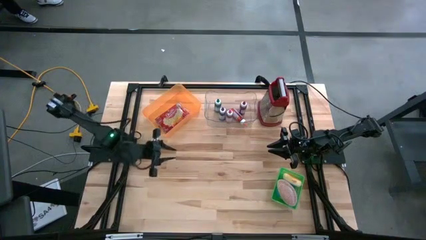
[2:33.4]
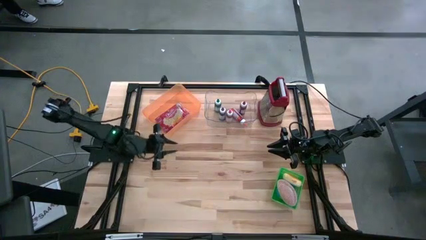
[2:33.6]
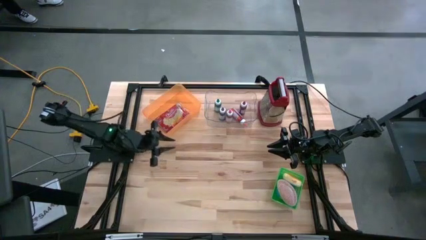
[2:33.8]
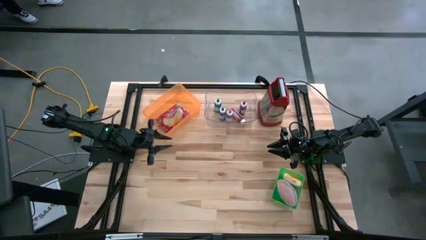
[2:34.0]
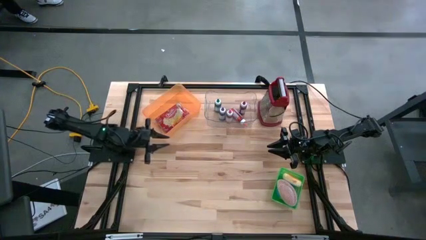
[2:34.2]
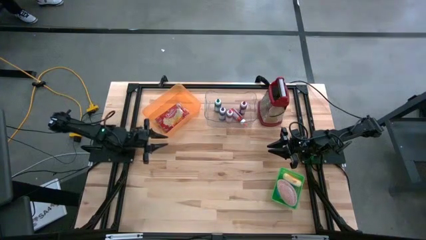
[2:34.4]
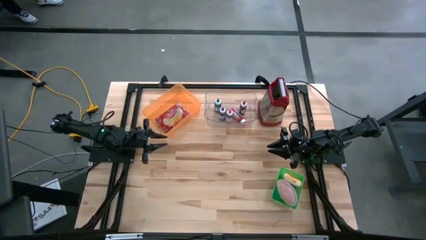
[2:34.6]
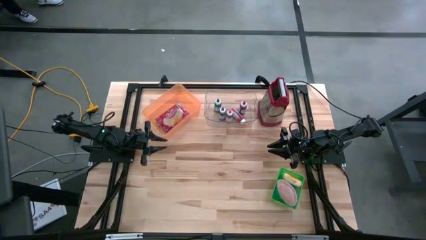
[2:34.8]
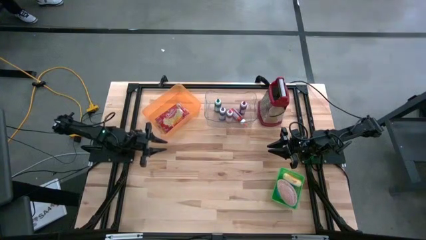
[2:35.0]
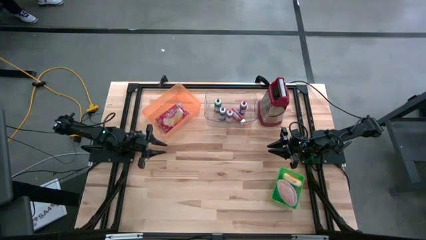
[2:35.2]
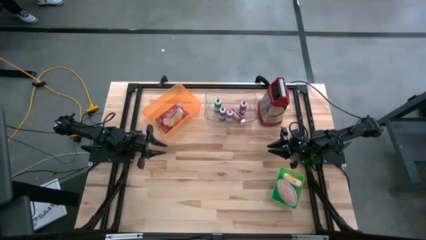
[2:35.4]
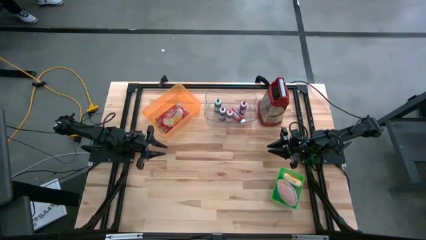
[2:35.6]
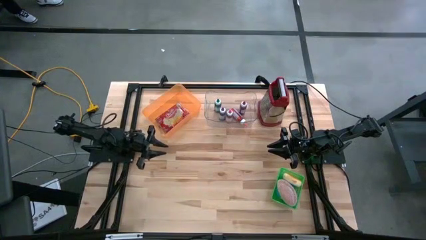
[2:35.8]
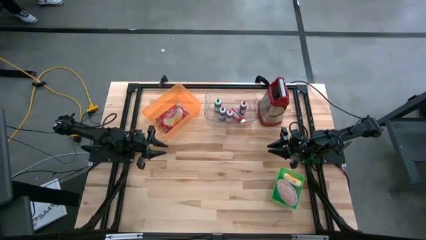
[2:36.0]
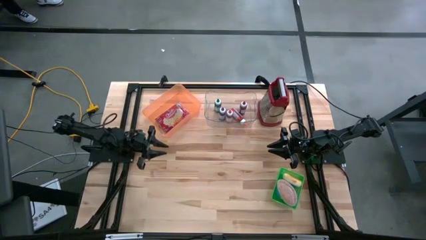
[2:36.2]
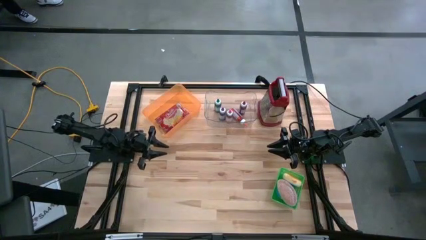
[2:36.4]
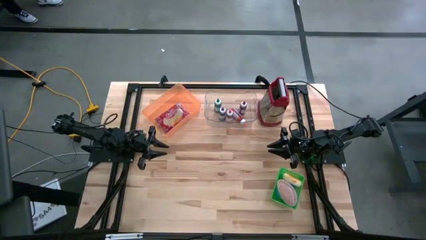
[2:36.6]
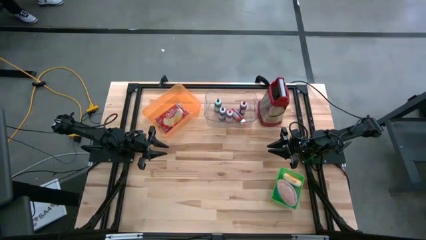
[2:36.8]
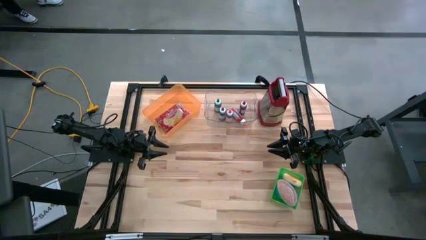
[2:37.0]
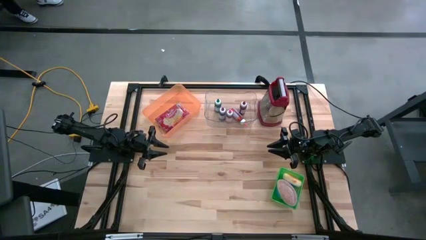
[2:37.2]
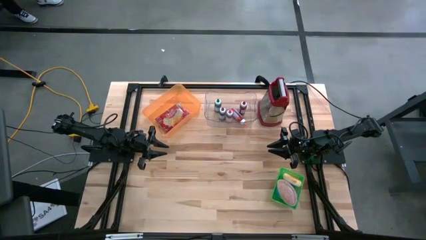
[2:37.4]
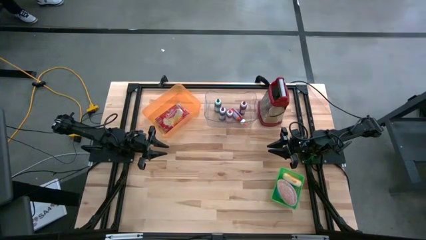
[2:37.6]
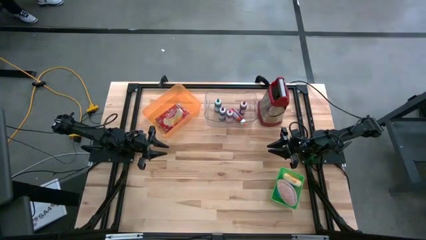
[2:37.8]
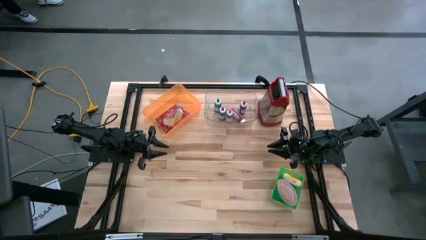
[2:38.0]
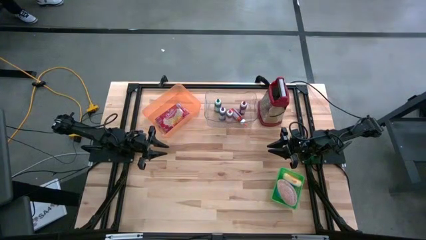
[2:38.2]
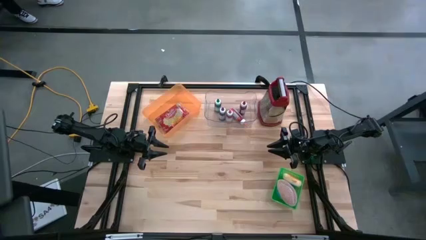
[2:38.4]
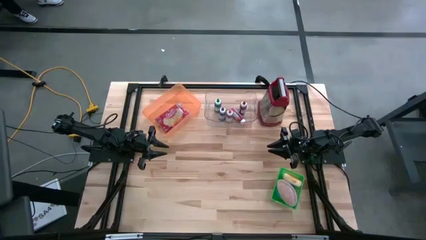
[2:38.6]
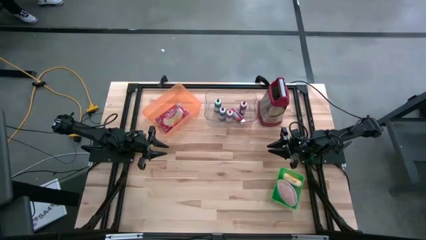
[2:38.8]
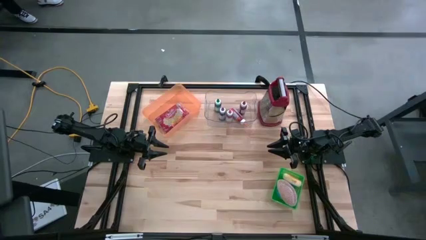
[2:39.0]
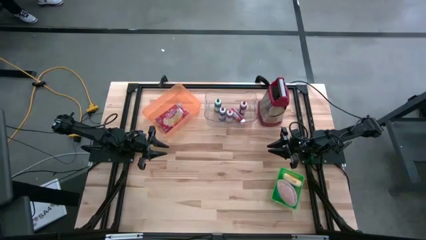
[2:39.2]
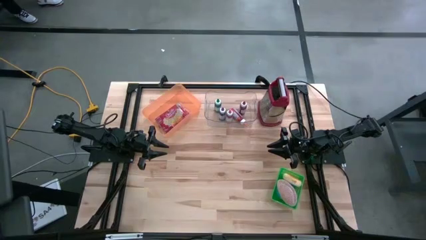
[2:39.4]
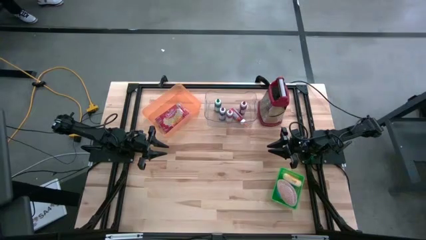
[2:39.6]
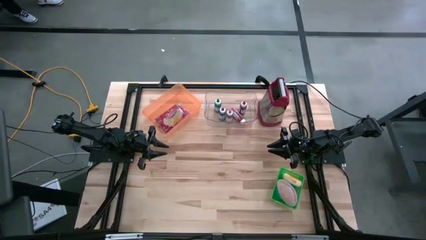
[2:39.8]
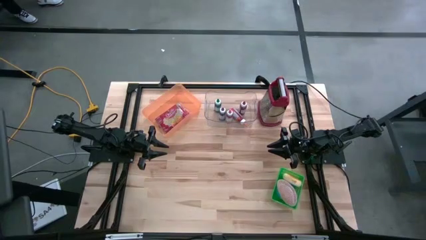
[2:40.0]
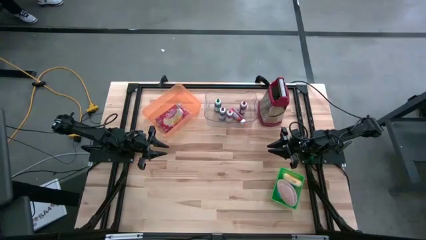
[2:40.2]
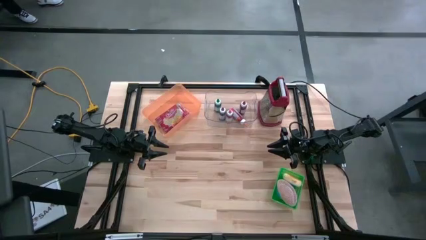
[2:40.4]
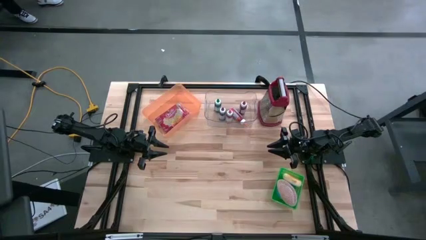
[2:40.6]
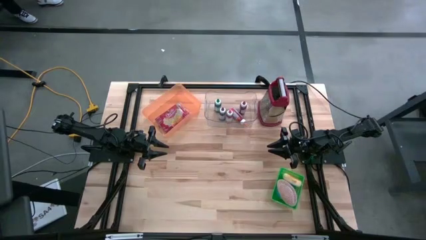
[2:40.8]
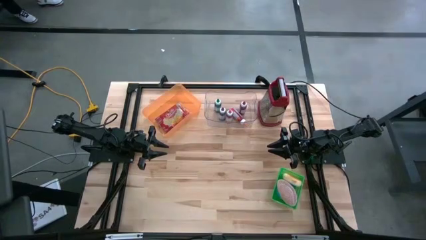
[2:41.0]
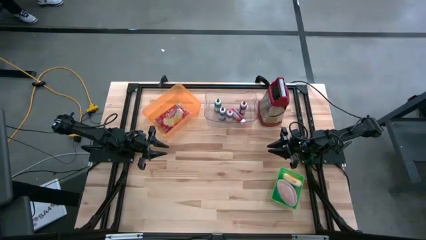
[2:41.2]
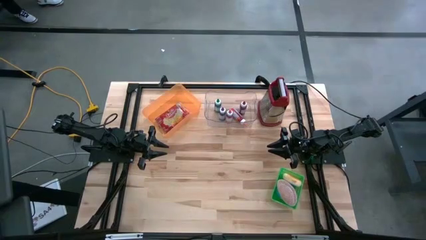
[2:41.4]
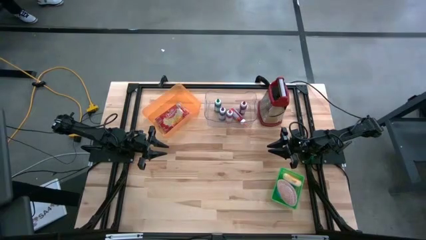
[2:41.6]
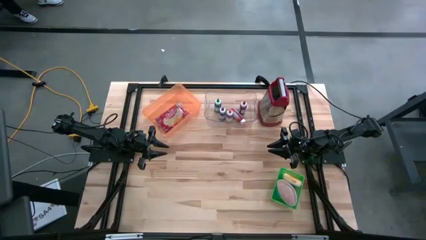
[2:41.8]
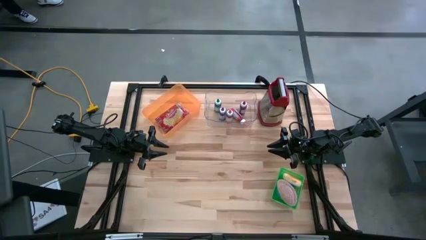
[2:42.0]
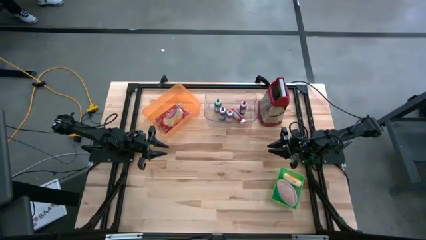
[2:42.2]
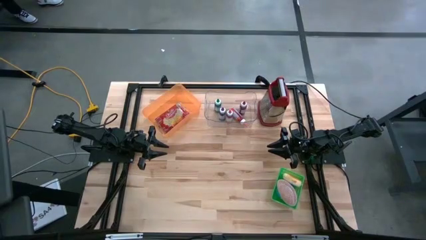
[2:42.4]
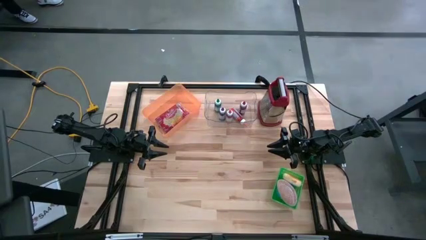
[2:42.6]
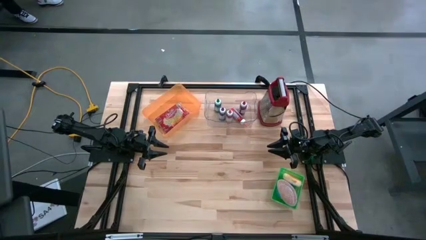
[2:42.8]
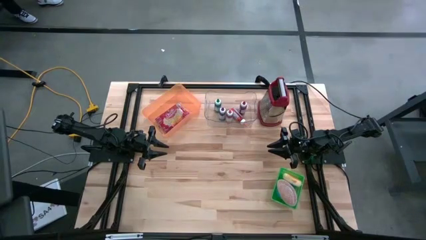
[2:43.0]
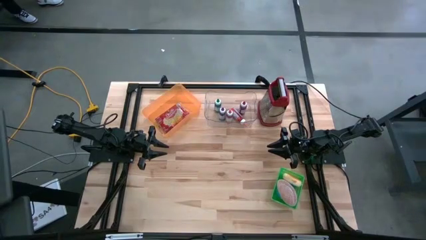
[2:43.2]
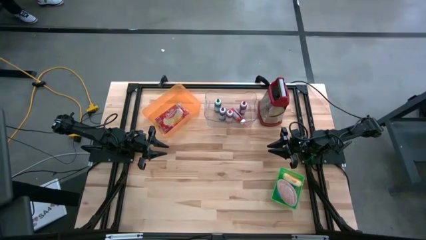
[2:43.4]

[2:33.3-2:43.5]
Return to Home Position
